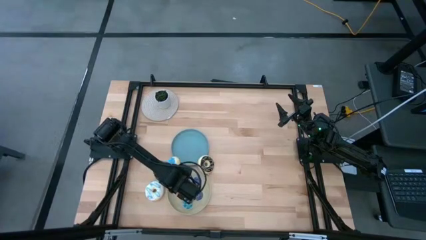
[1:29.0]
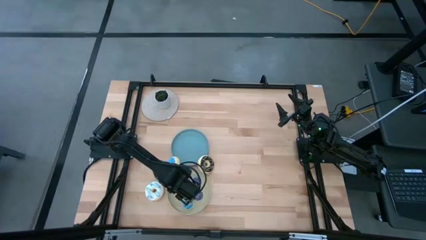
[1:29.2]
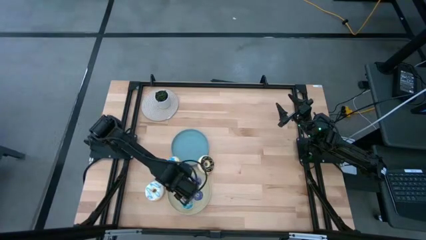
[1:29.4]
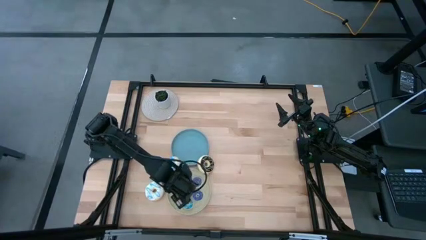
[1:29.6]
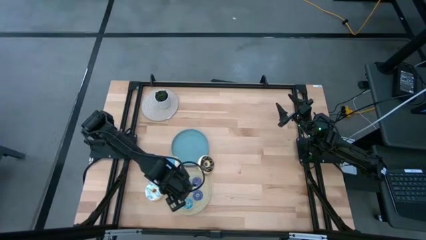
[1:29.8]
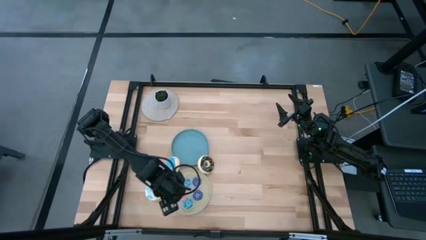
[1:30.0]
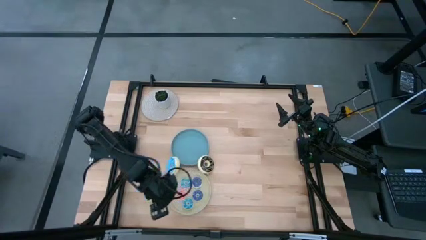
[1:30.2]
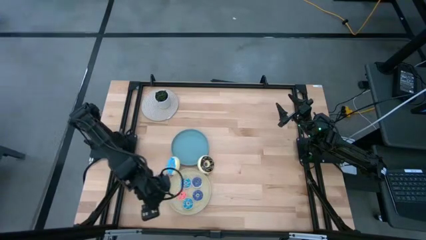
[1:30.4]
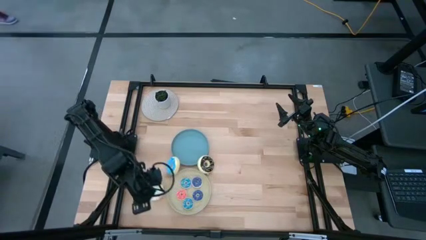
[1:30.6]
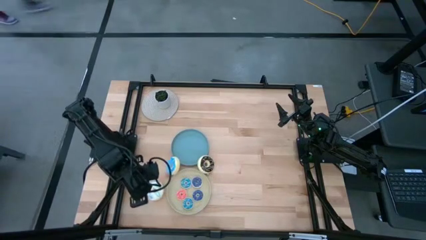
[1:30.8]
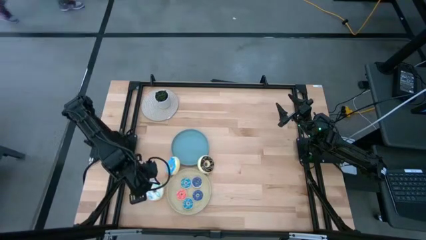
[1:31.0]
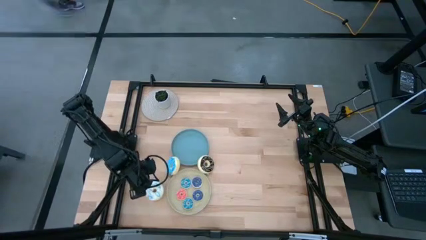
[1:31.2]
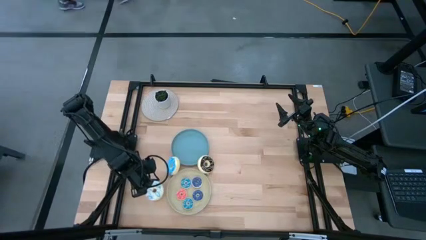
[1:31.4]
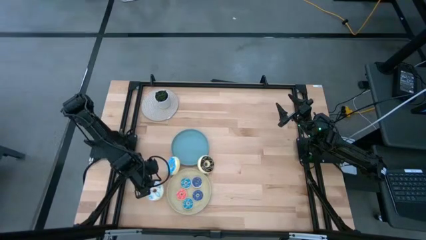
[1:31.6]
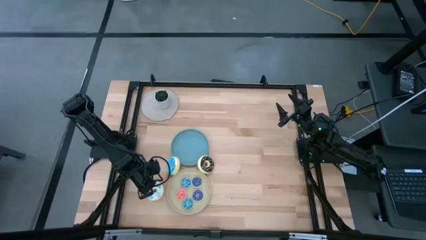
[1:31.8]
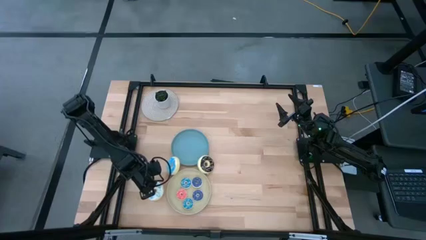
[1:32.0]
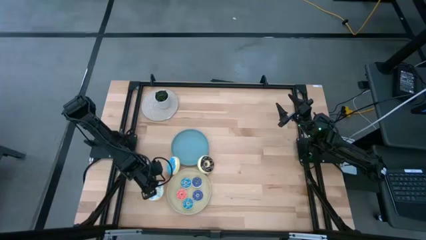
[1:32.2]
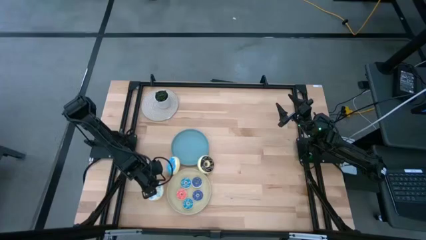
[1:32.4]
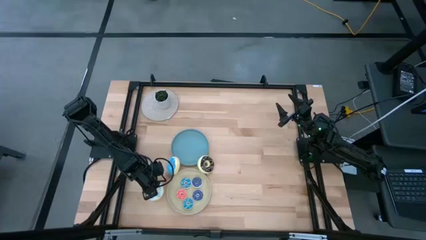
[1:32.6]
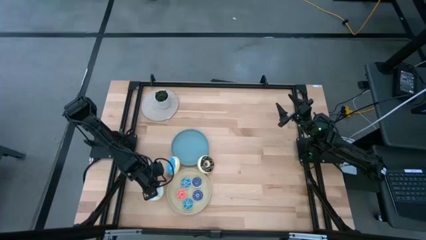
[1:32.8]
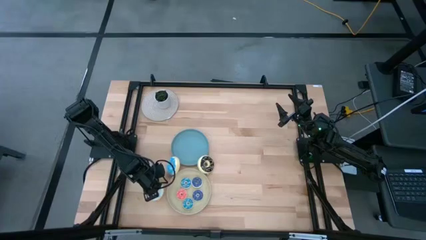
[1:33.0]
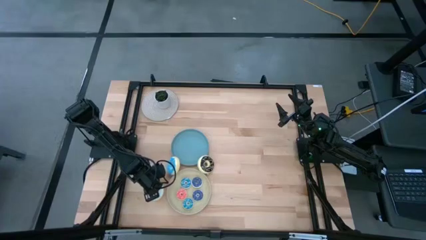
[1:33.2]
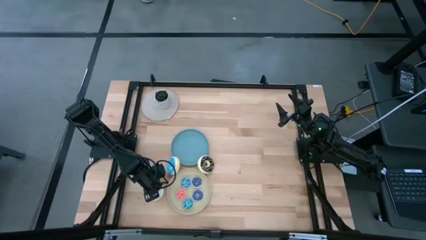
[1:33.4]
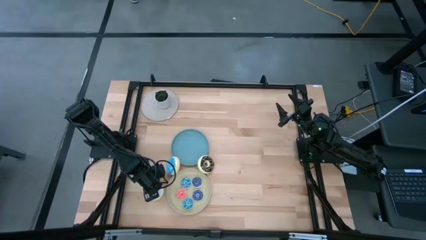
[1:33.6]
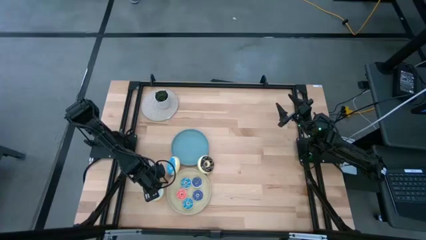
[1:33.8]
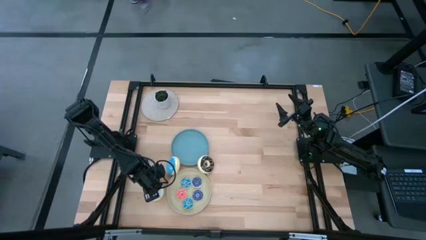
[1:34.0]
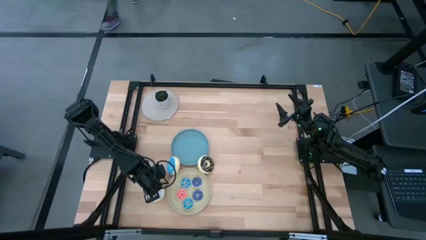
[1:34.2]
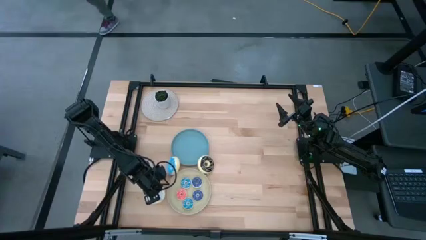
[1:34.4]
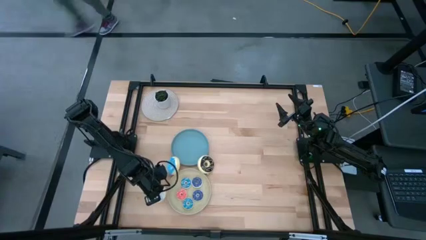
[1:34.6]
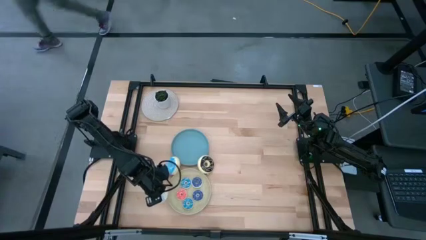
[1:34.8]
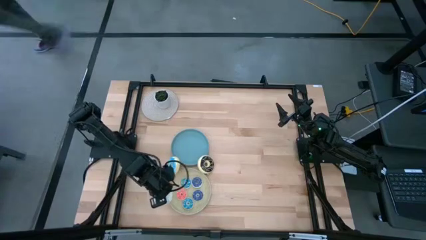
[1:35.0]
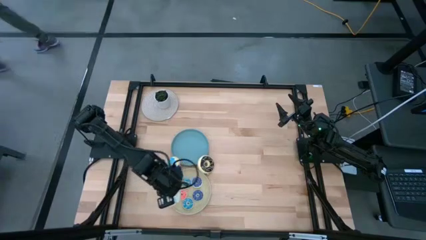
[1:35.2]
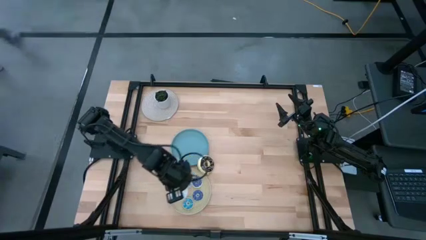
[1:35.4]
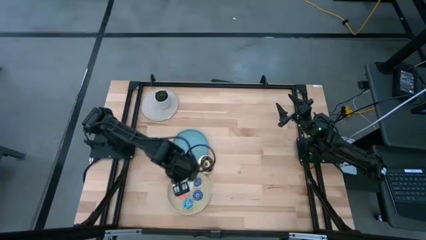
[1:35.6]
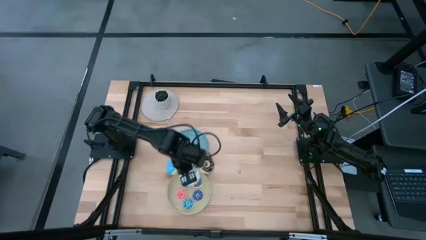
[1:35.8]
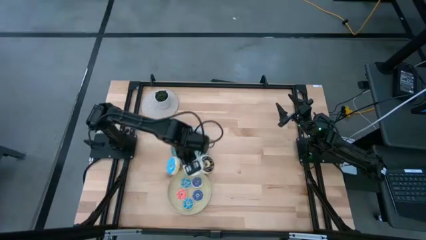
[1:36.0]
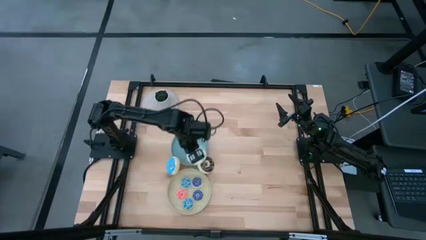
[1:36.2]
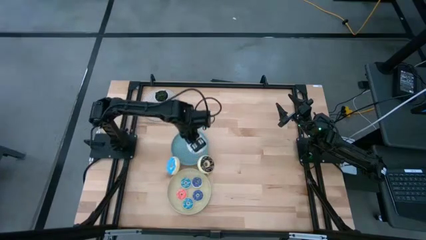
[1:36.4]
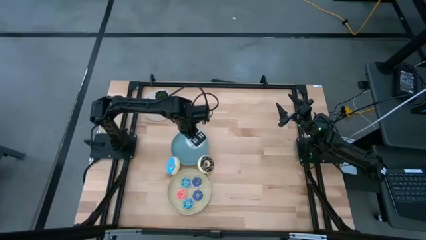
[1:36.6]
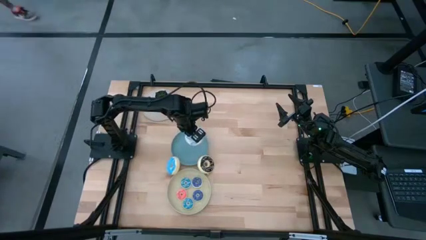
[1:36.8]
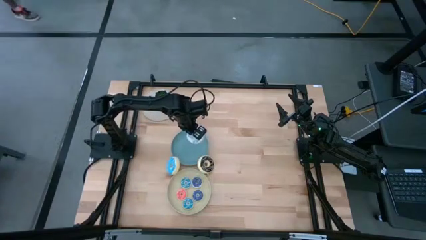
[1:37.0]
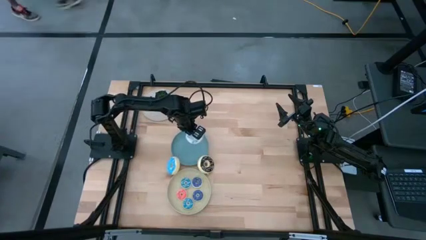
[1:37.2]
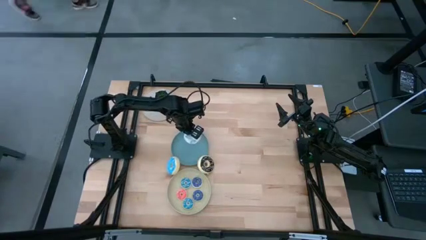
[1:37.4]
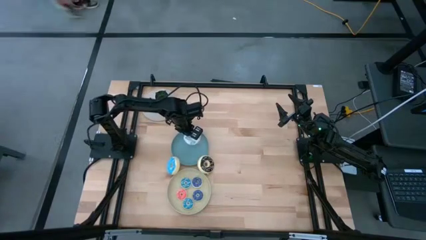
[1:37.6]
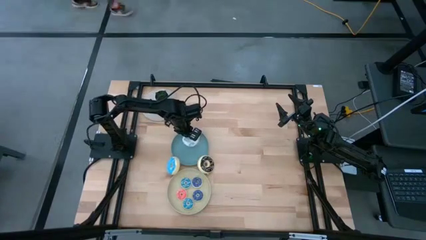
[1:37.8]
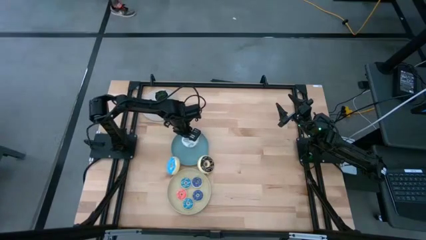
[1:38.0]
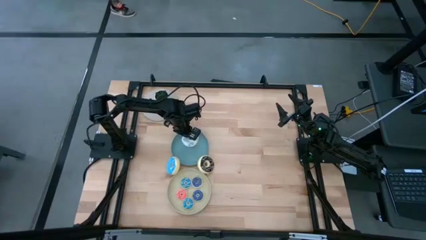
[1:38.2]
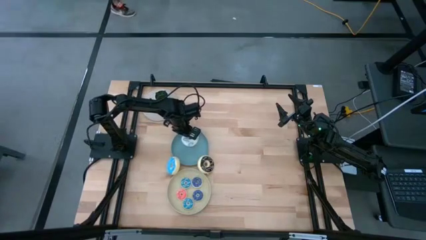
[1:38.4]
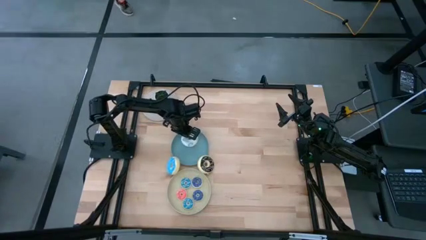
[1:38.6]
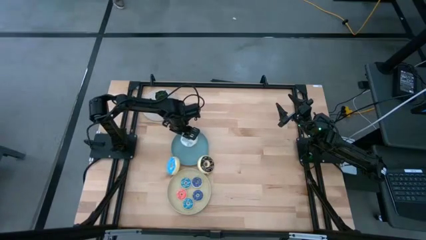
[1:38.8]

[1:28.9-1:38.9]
Task: Pick & Place donuts
Put the big white donut on the blue plate

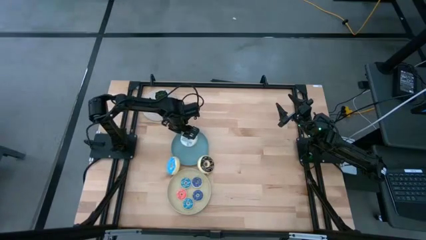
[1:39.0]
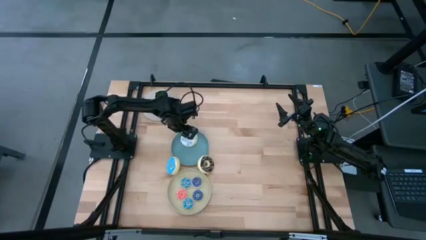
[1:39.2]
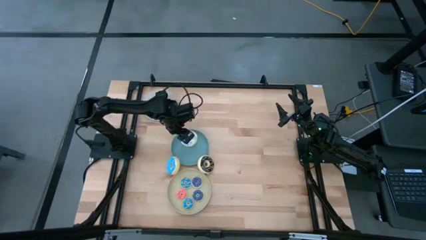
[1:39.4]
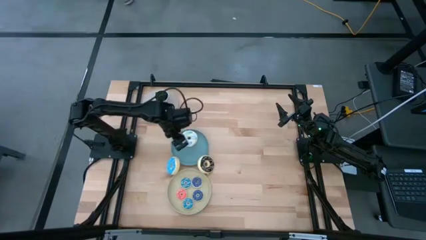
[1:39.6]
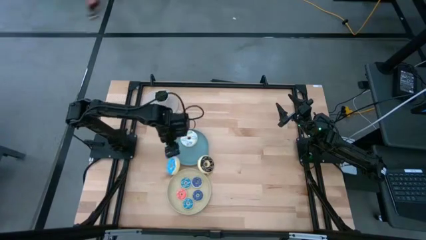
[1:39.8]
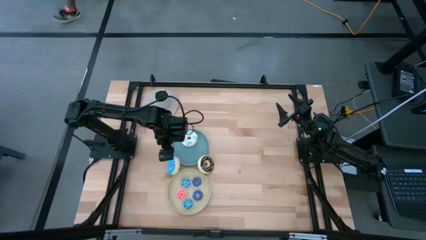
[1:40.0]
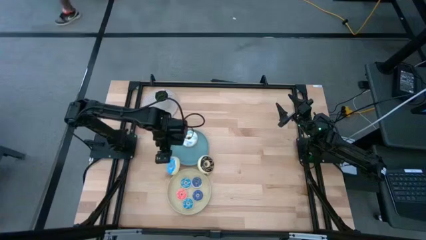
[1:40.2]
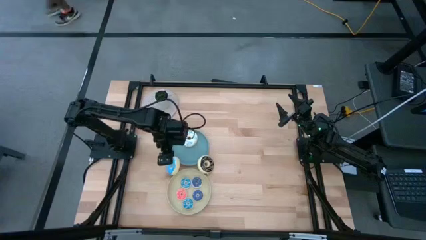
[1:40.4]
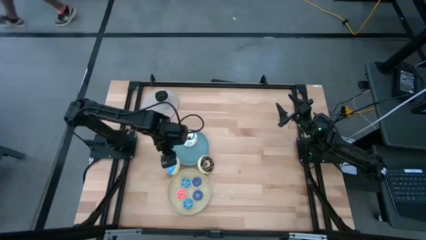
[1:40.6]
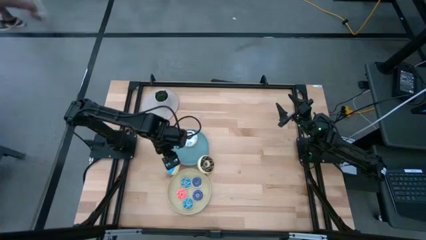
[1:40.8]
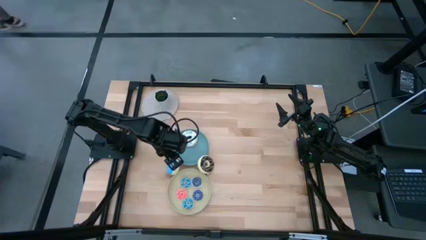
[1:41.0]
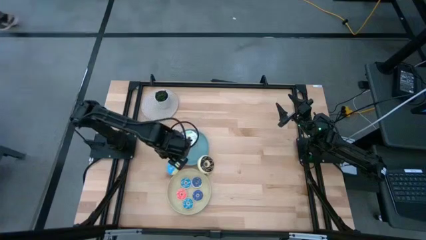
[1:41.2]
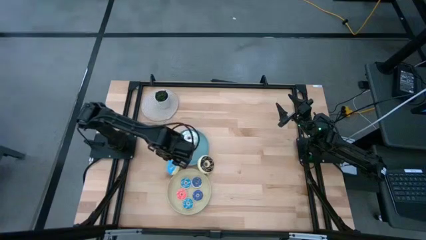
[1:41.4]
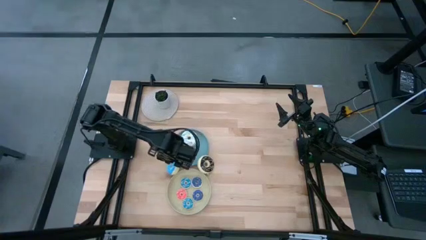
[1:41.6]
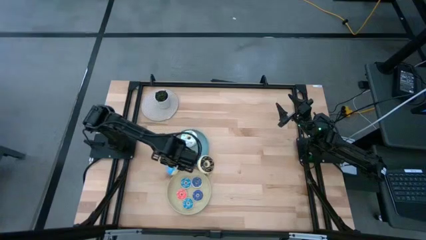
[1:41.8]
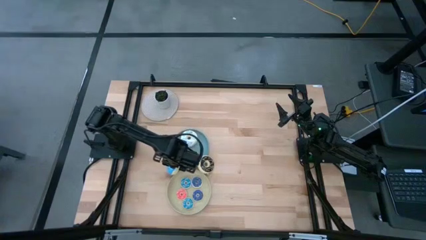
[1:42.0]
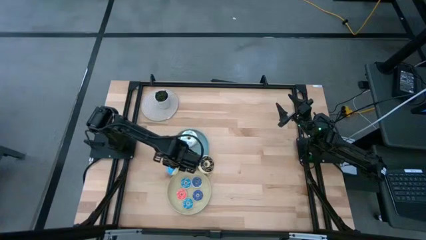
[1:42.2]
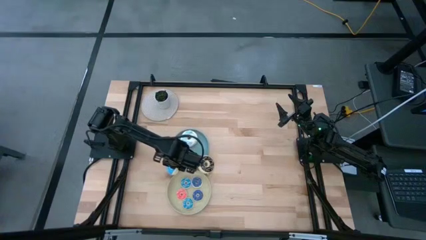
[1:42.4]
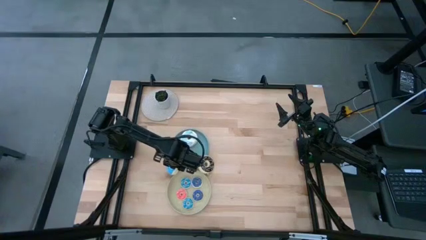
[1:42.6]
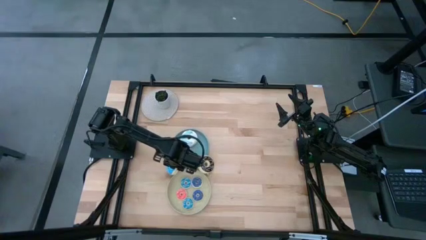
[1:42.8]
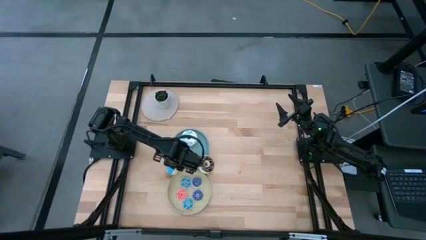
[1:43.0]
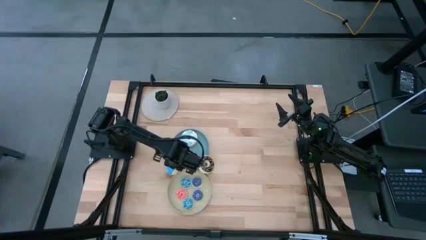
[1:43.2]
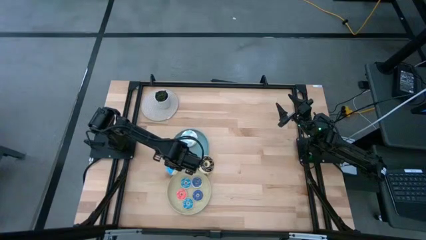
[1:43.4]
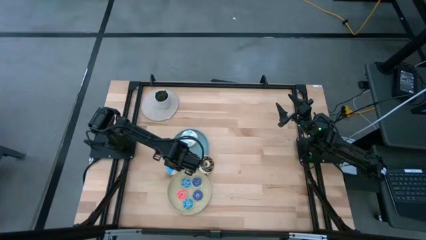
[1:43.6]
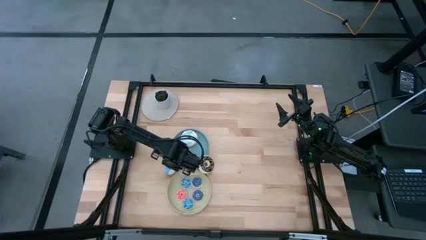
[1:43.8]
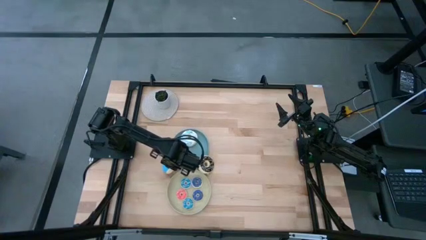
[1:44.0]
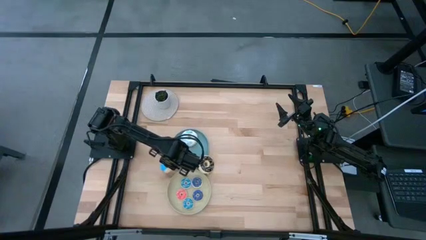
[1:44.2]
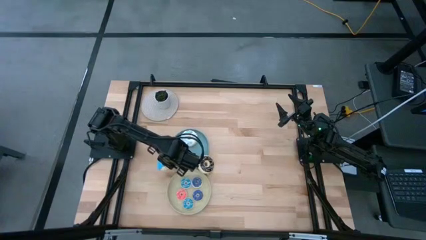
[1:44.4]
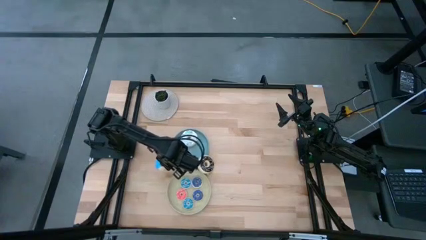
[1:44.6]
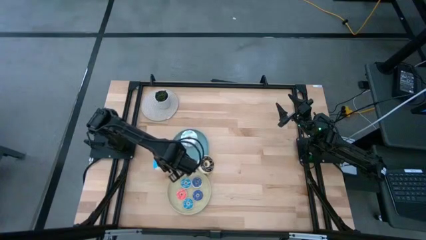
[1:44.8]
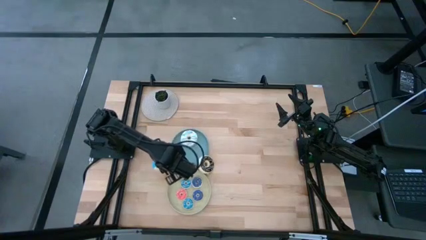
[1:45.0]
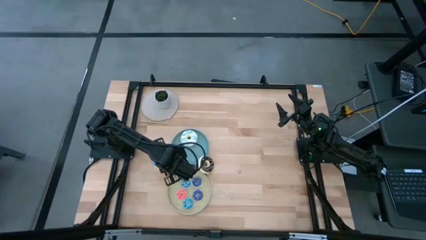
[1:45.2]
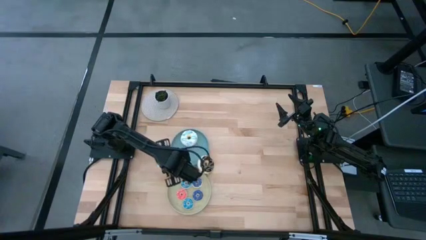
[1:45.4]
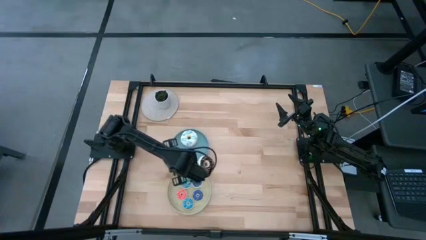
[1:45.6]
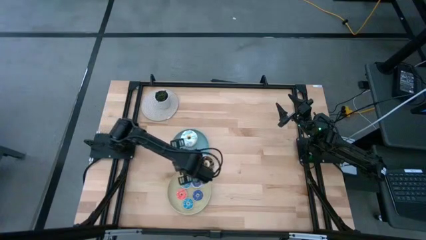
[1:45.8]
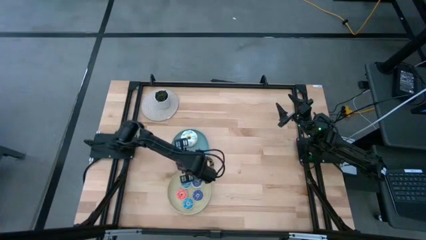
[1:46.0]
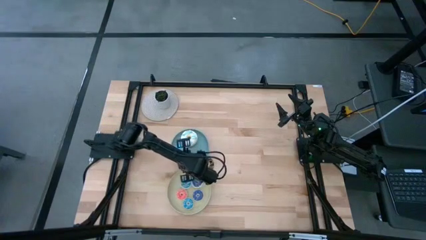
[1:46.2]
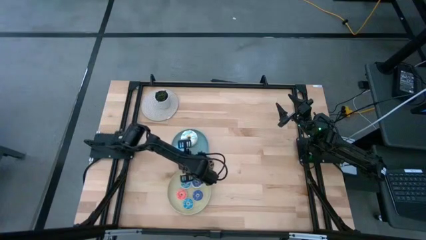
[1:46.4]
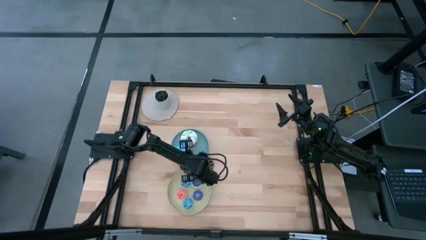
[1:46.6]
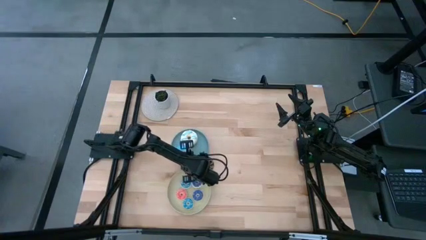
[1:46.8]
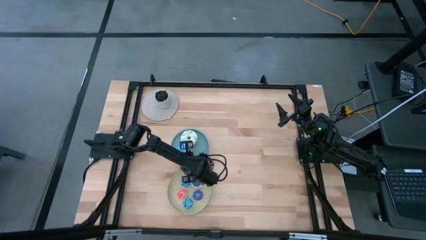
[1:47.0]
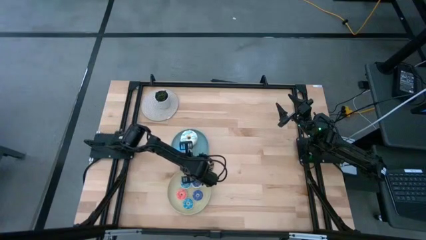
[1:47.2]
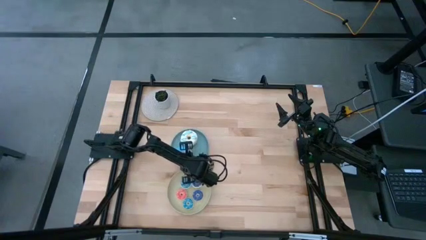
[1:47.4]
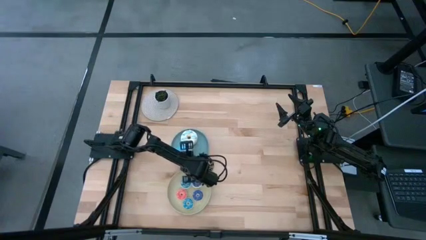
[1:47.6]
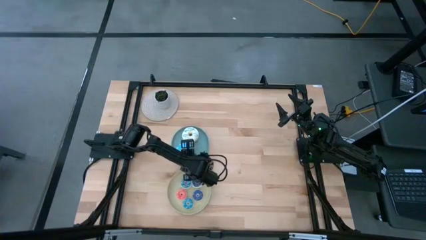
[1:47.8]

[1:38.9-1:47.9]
Put the big light blue donut on the blue plate
